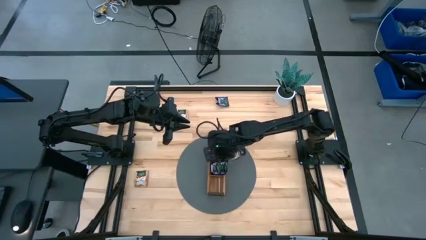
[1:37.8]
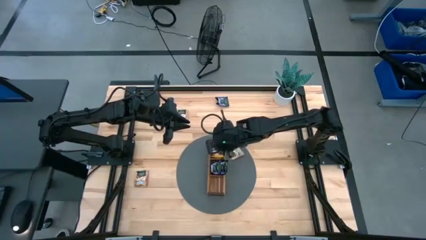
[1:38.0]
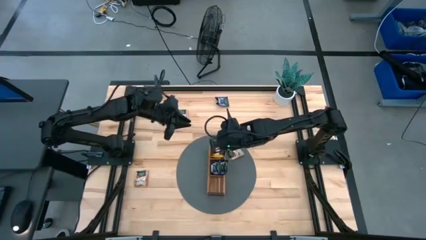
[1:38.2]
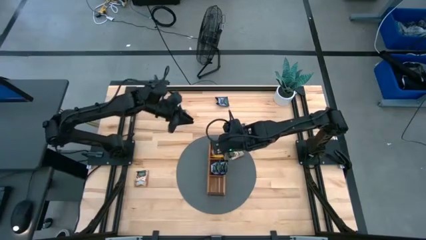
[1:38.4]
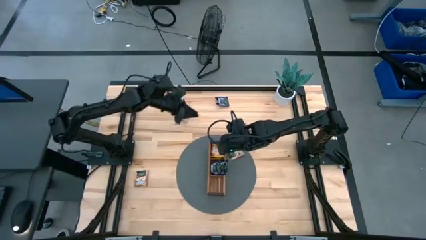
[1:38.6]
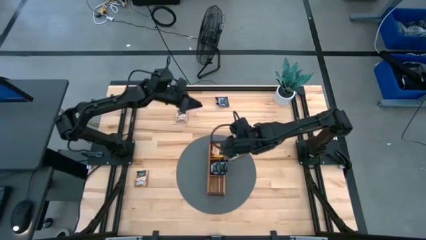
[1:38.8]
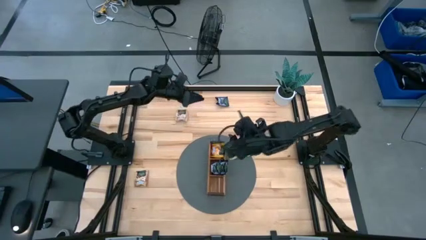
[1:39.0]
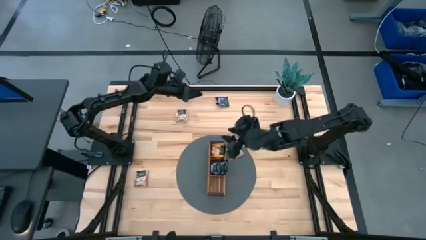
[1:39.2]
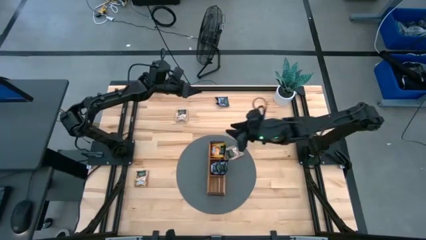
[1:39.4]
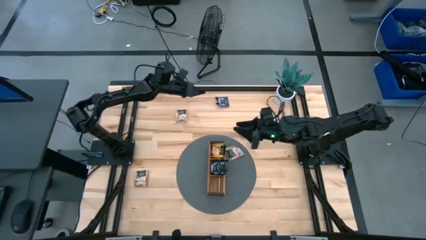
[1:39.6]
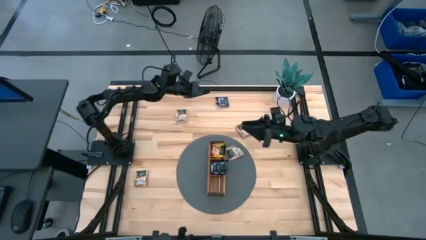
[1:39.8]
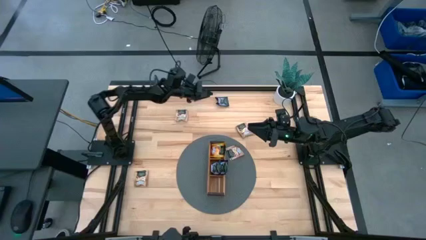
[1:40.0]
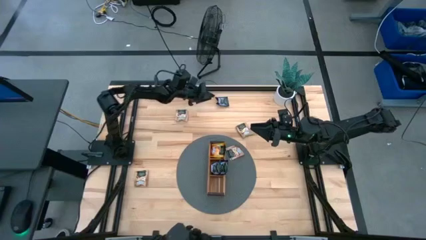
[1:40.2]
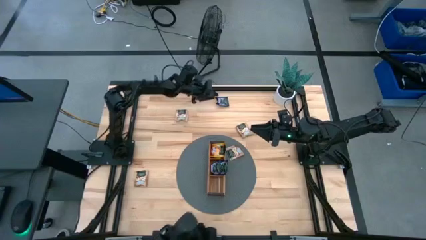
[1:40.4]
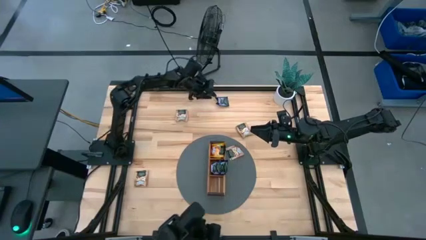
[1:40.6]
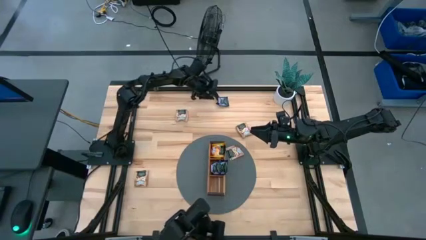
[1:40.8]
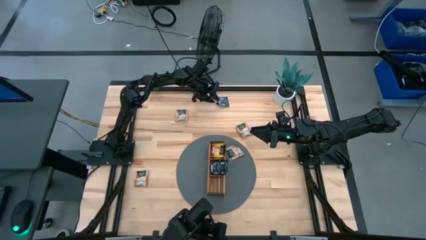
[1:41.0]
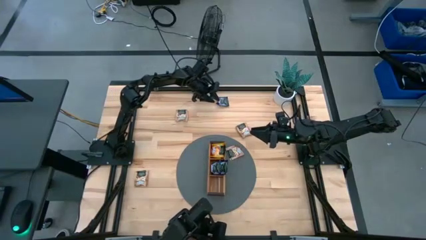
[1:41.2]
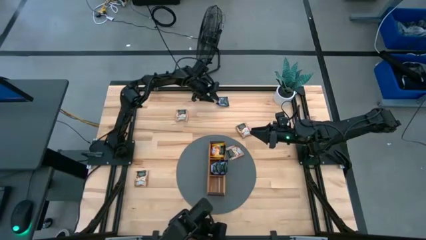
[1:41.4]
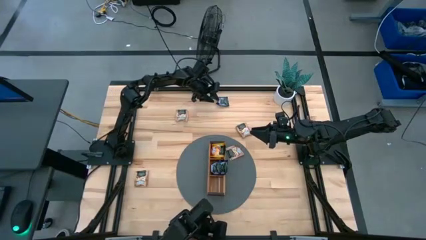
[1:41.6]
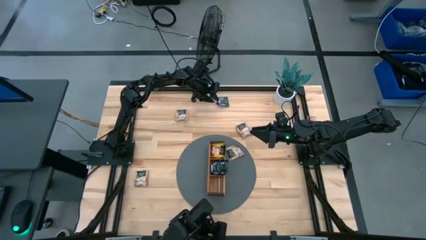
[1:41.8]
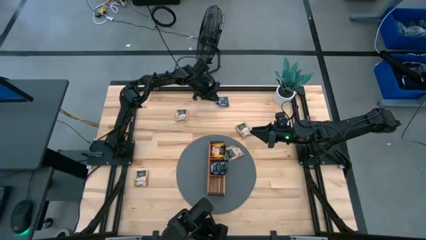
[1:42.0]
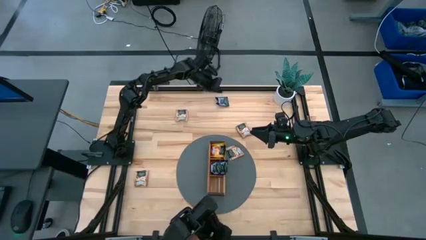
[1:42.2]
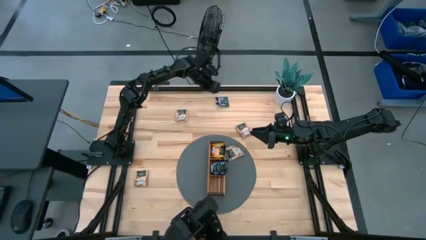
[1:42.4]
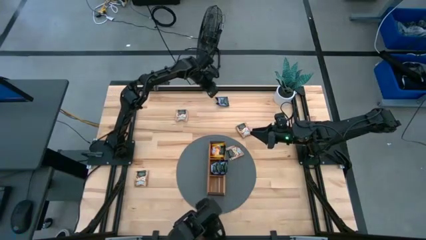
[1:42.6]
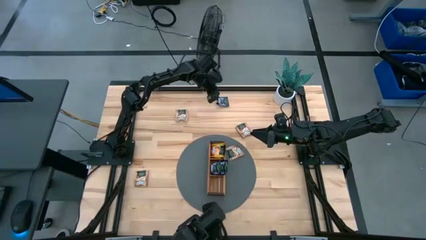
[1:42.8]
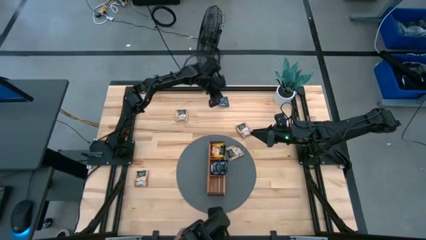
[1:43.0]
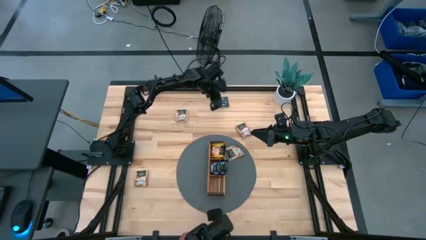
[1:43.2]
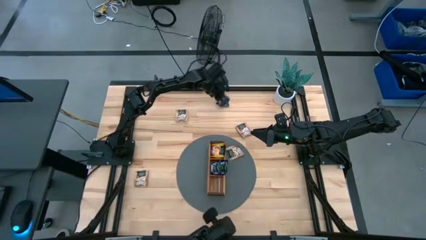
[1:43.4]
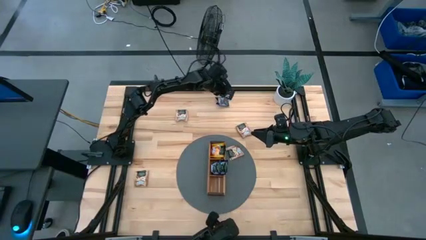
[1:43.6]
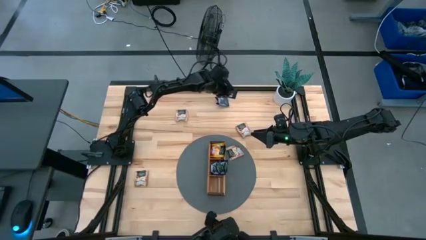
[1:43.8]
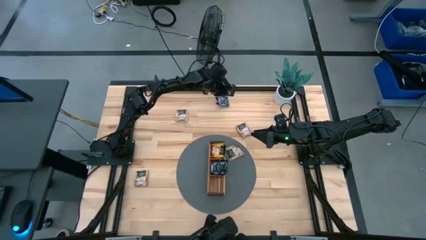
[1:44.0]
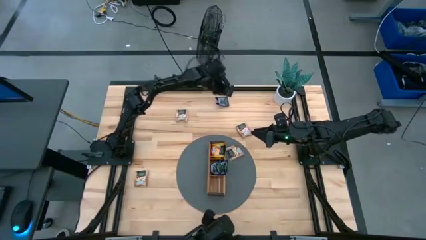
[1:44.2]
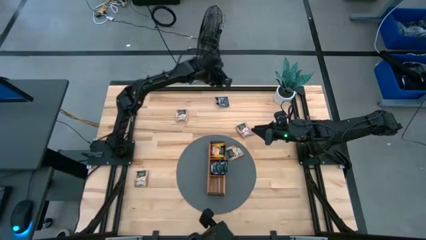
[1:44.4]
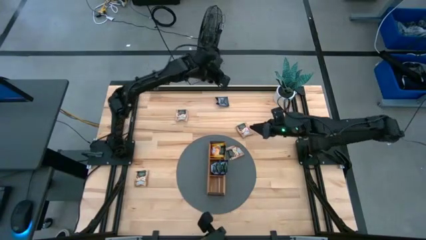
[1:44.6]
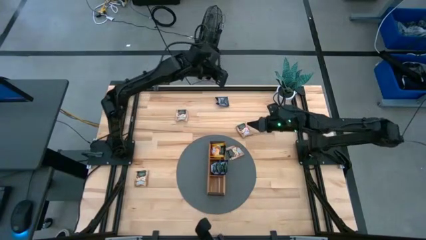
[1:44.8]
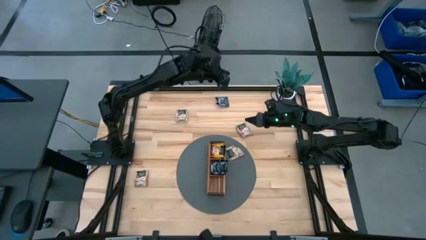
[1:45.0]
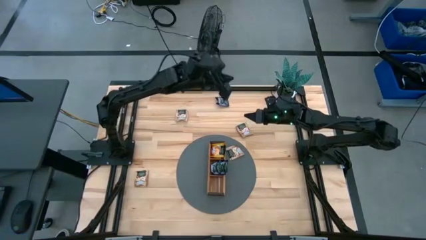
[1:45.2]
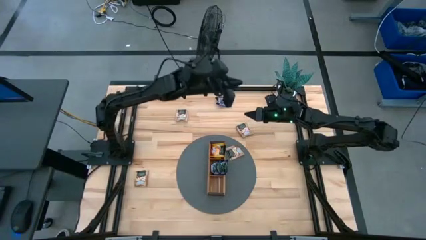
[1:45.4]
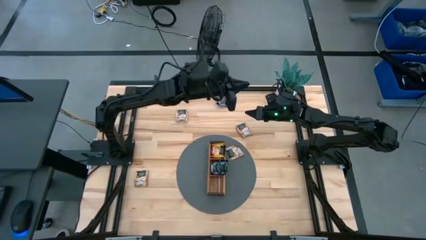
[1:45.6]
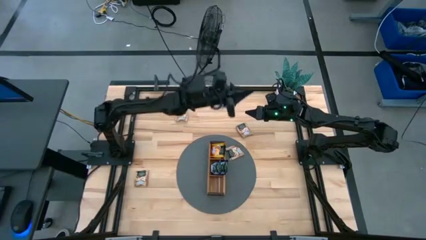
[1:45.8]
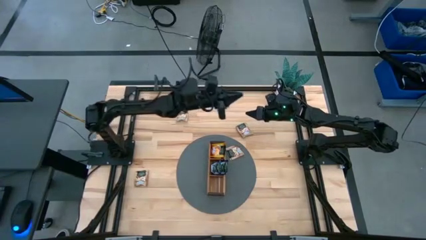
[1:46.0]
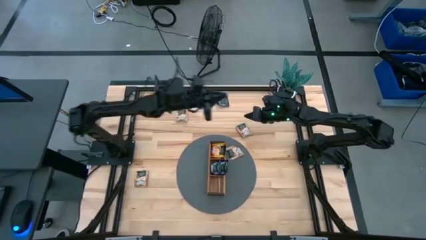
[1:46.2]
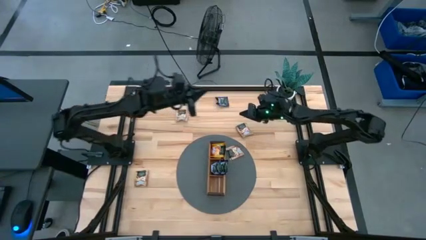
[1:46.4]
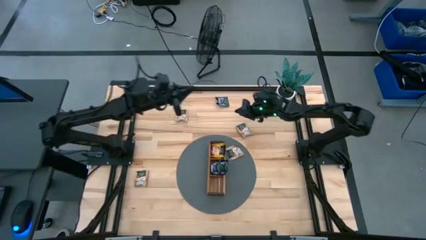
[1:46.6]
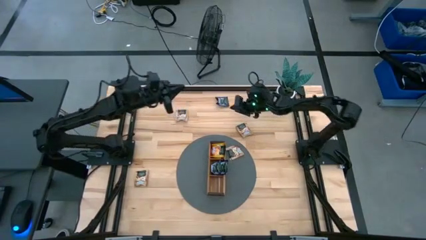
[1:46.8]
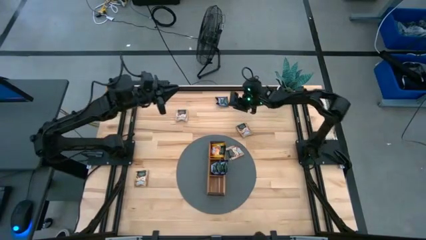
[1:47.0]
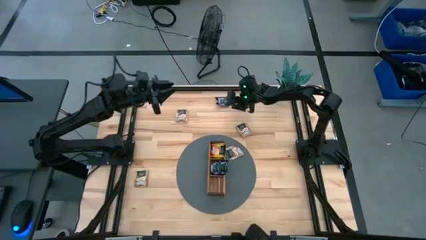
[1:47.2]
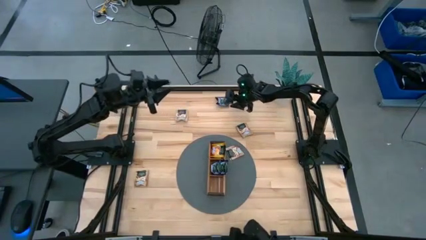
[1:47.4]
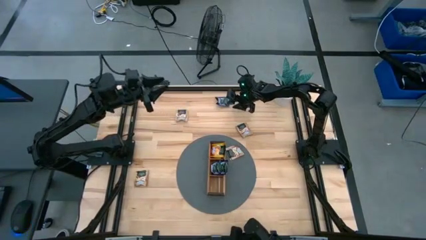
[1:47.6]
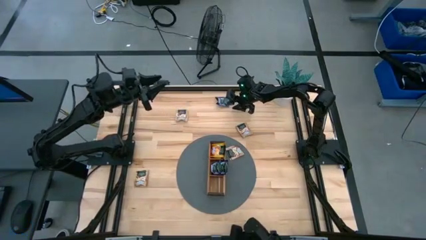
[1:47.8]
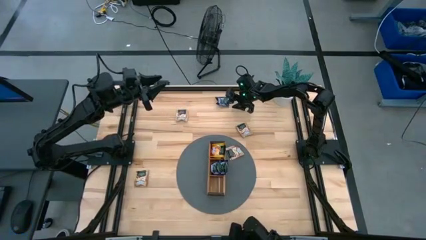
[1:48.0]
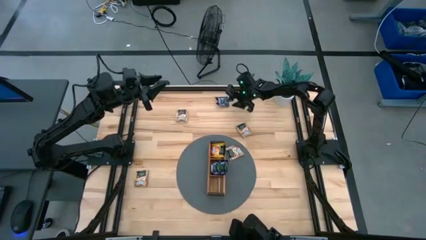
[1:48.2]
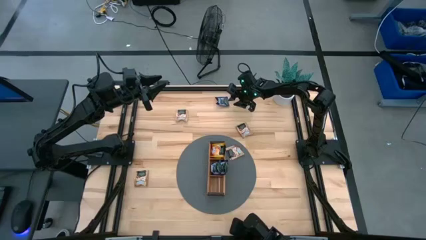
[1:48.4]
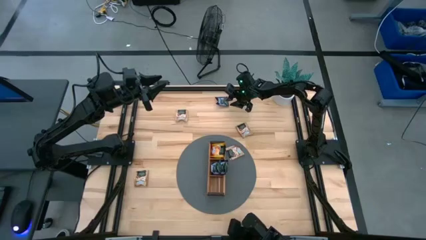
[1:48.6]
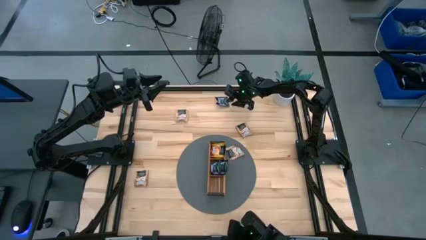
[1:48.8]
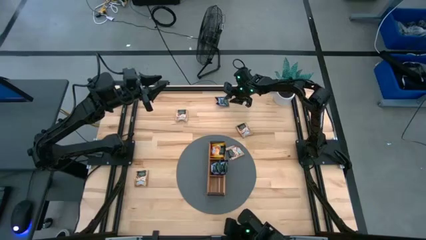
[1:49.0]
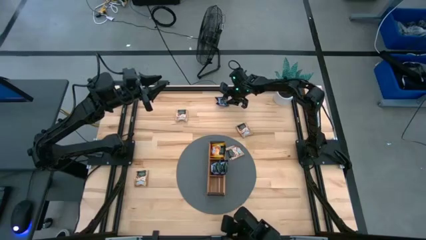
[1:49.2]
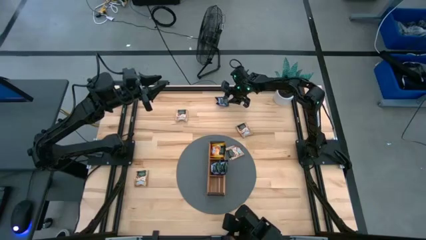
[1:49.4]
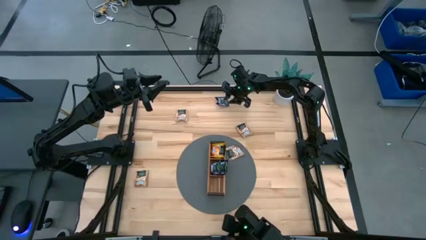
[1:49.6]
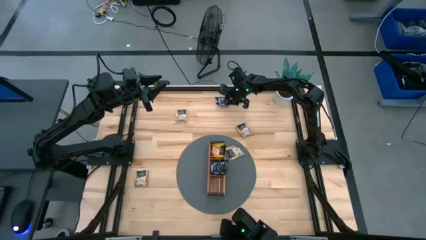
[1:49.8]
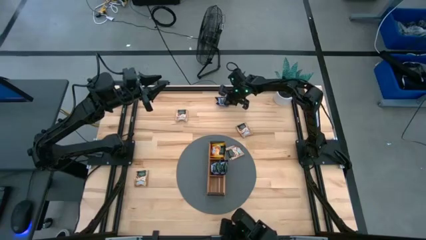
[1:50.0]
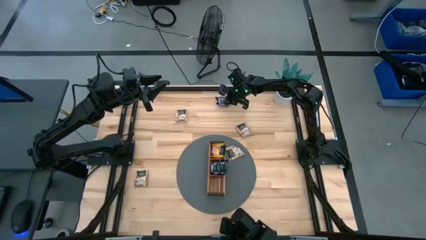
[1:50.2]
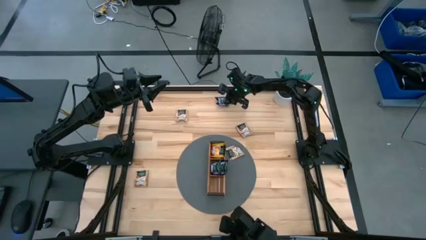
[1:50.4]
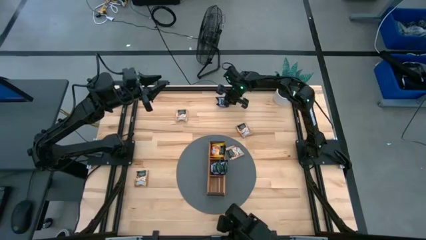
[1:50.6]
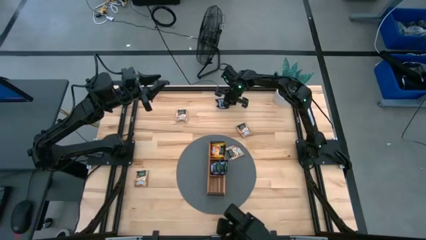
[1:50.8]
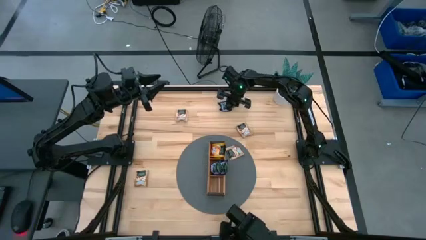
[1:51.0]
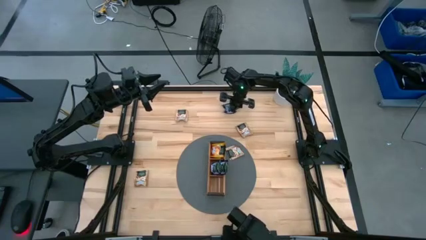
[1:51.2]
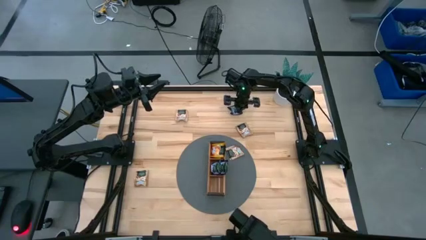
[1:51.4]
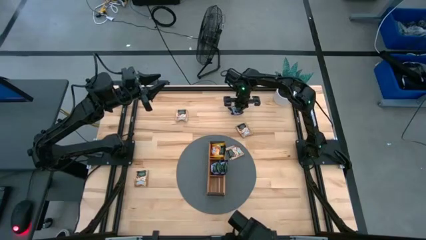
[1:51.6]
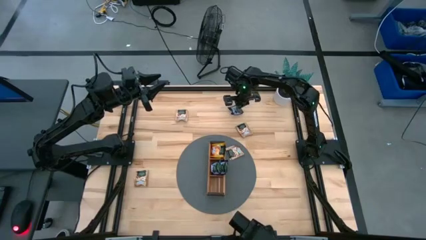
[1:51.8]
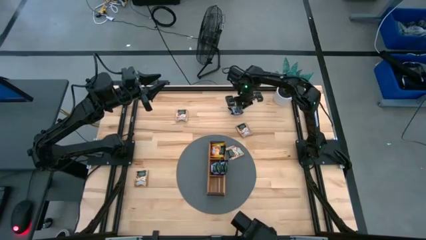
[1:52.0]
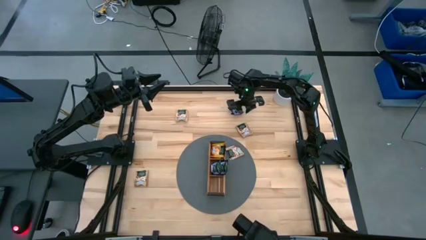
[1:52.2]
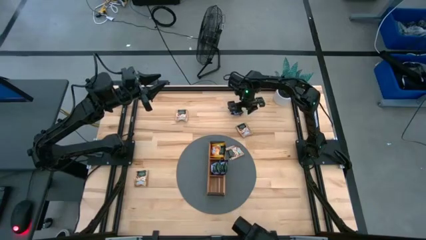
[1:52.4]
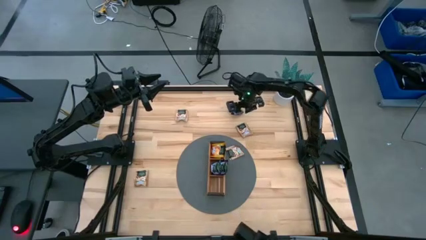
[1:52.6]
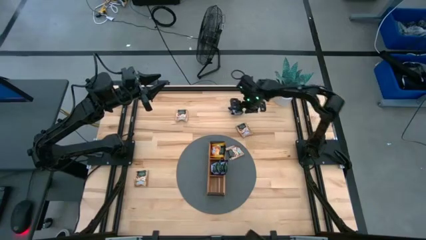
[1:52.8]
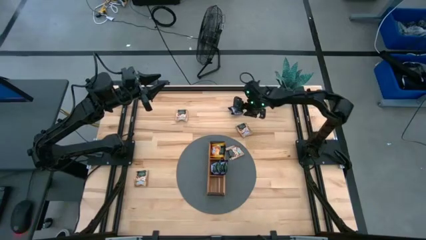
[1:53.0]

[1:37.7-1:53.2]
Task: Pick & Place Tea
Put the purple tea bag into the middle section of the wooden organizer
